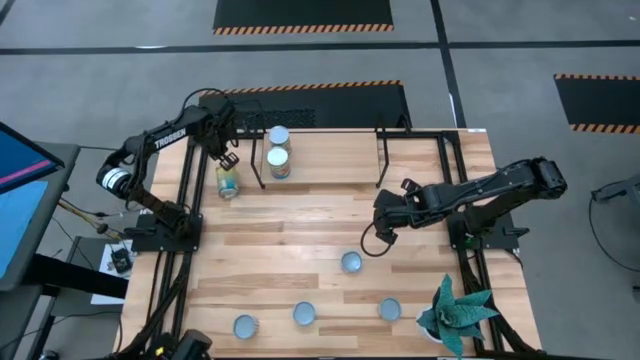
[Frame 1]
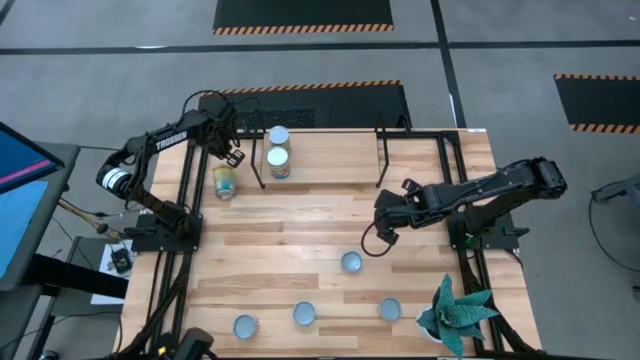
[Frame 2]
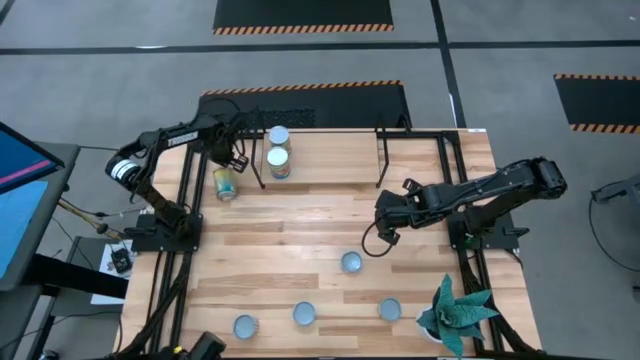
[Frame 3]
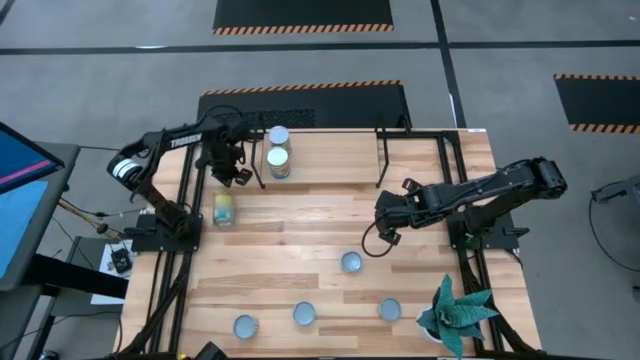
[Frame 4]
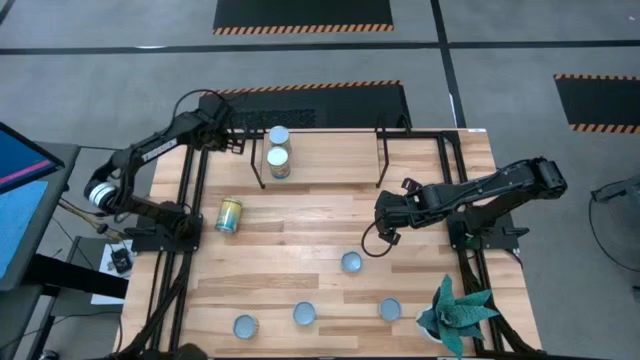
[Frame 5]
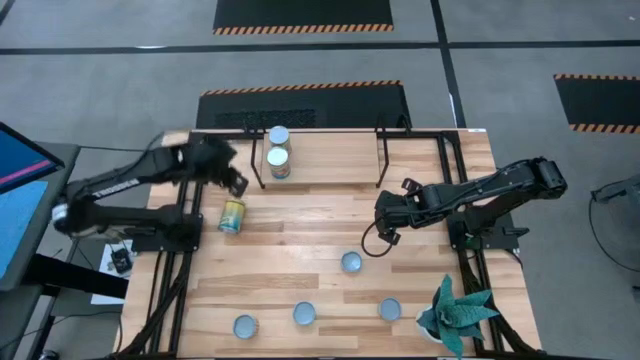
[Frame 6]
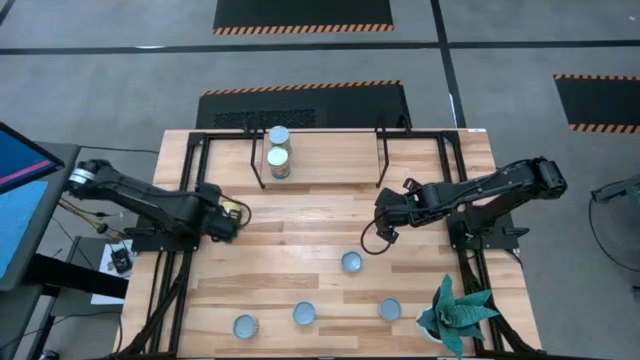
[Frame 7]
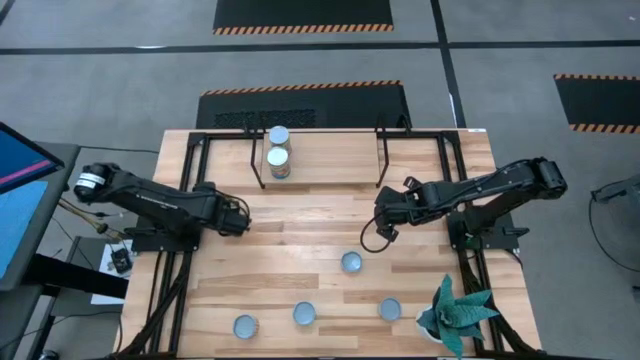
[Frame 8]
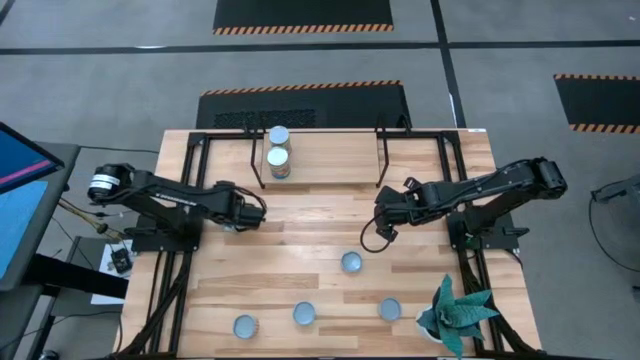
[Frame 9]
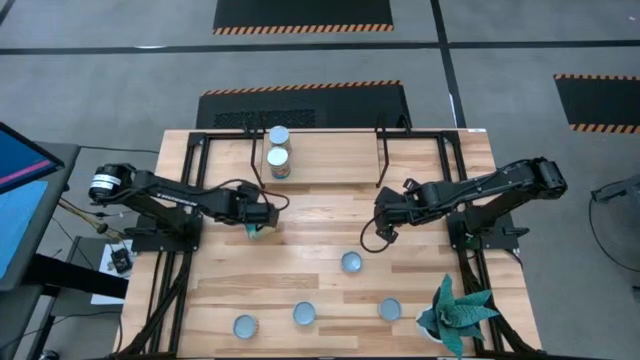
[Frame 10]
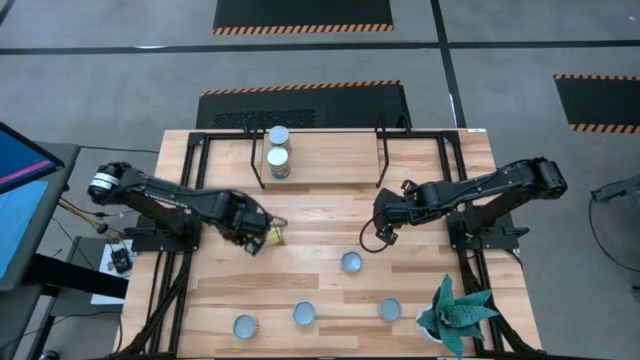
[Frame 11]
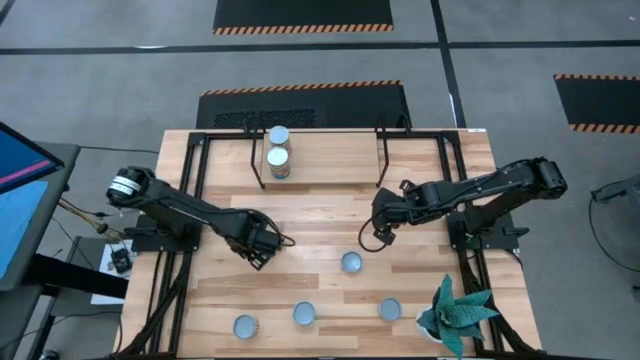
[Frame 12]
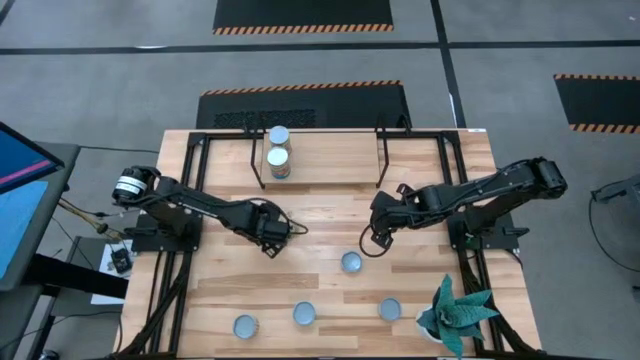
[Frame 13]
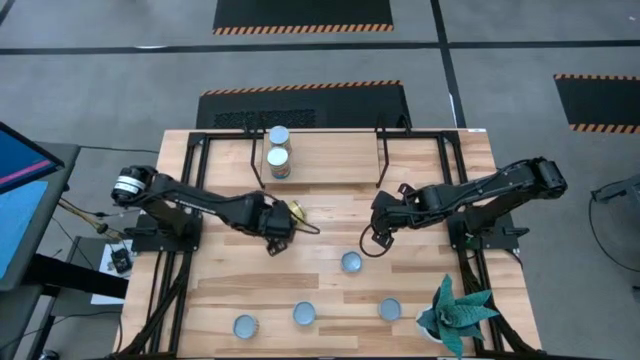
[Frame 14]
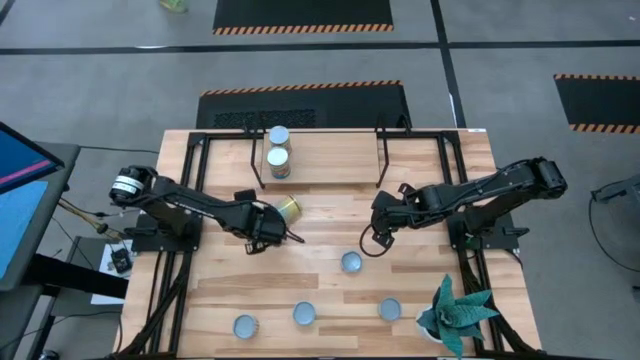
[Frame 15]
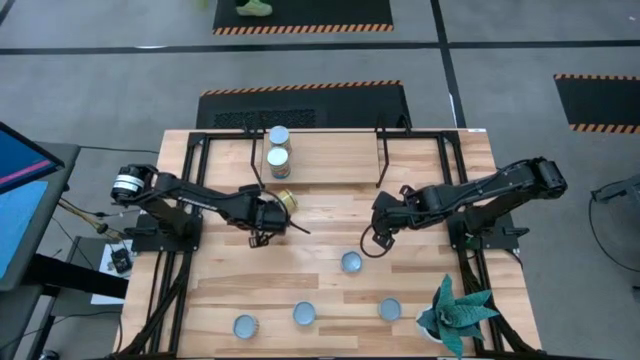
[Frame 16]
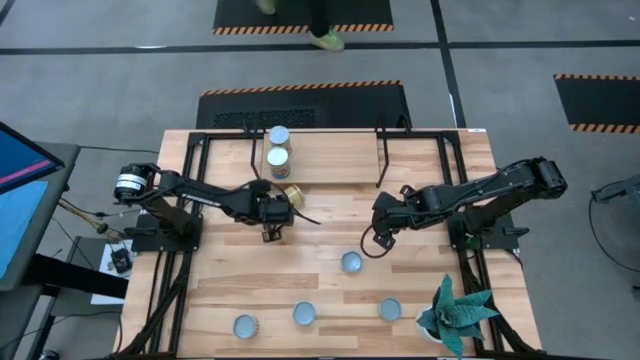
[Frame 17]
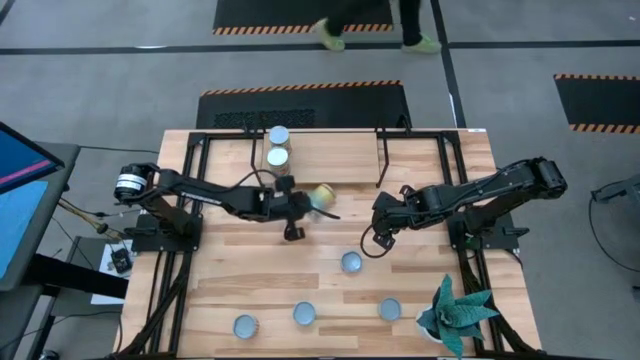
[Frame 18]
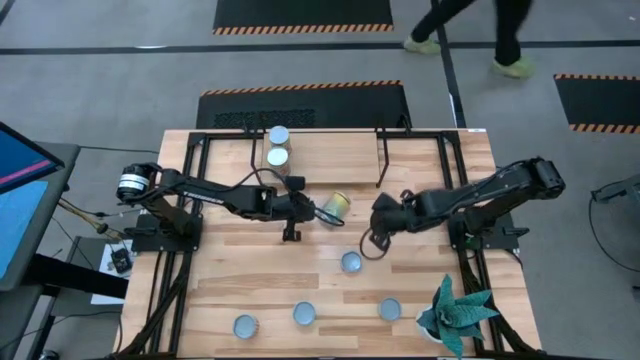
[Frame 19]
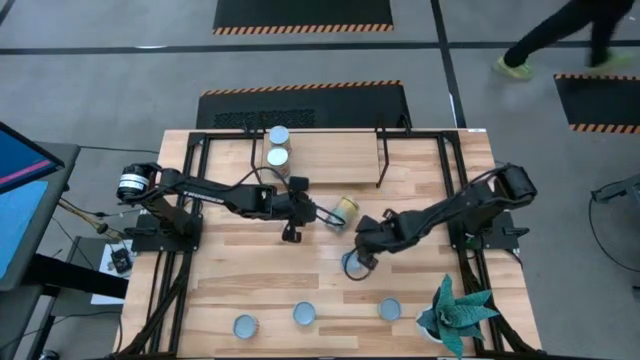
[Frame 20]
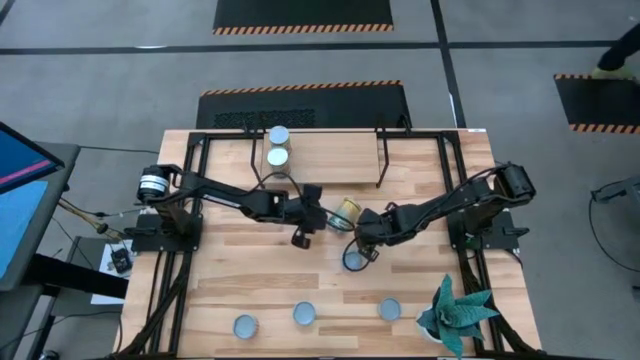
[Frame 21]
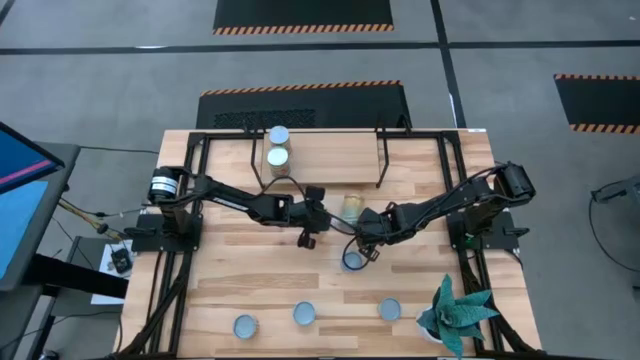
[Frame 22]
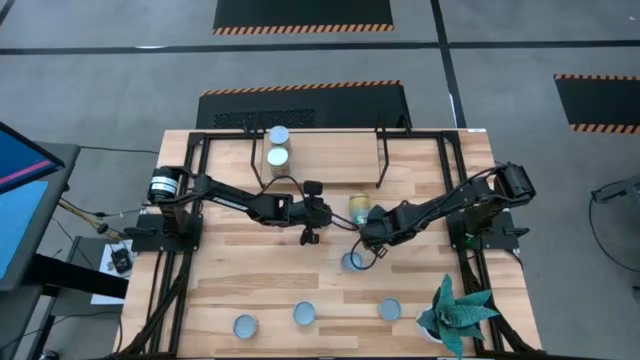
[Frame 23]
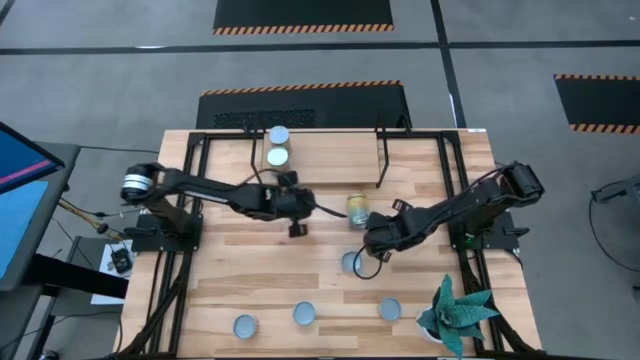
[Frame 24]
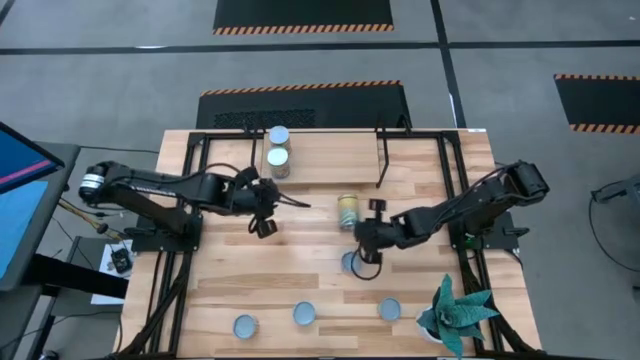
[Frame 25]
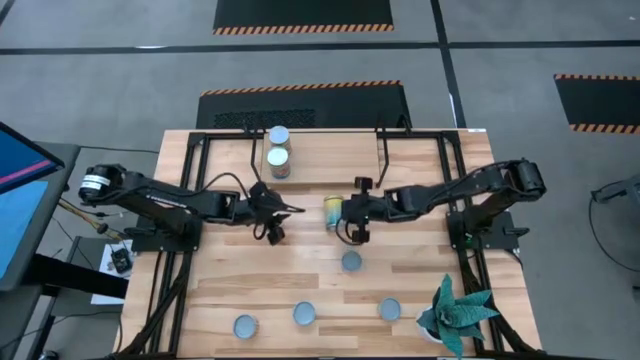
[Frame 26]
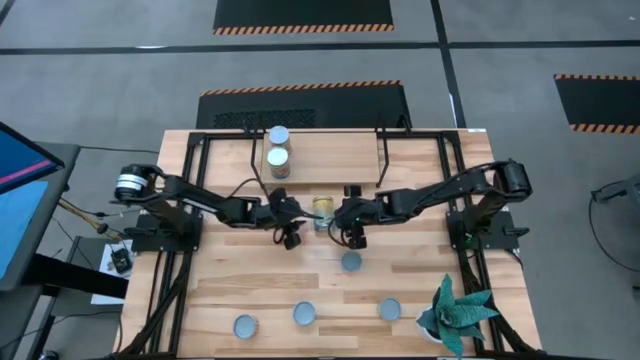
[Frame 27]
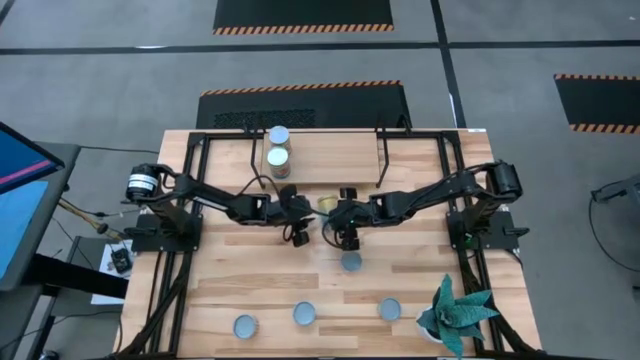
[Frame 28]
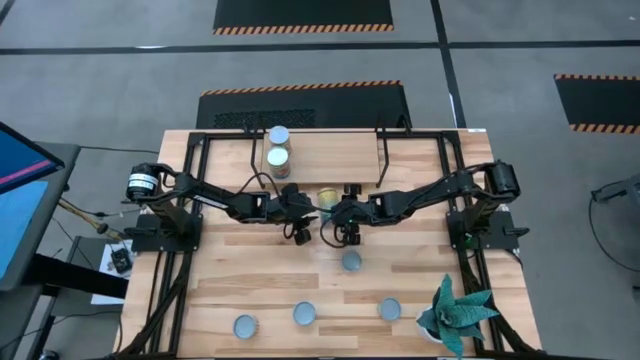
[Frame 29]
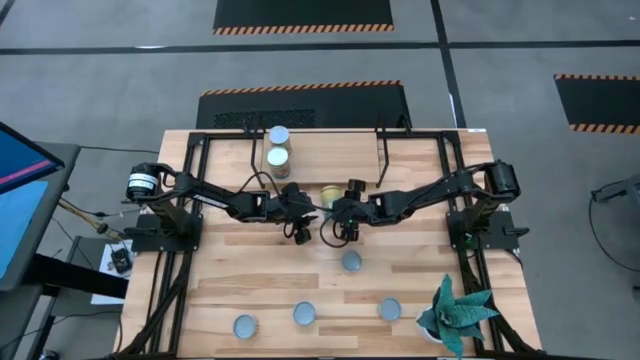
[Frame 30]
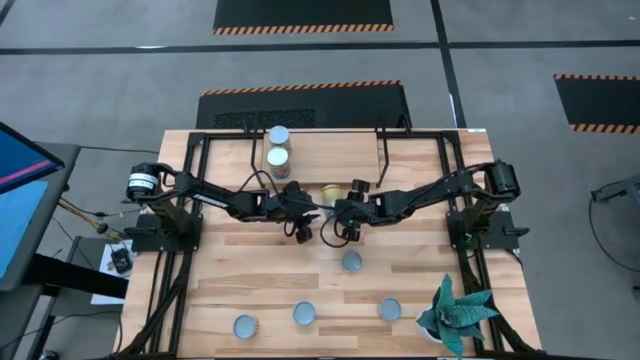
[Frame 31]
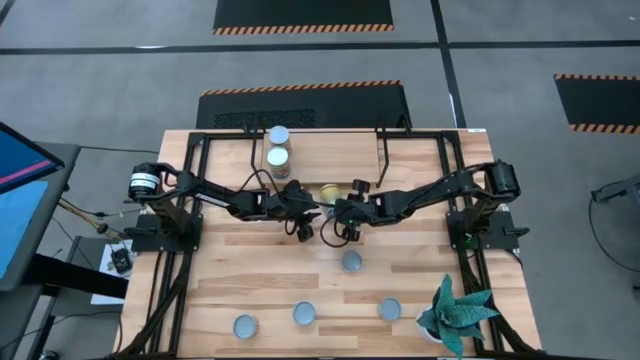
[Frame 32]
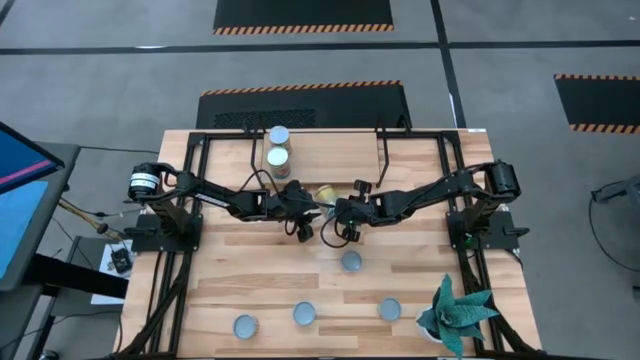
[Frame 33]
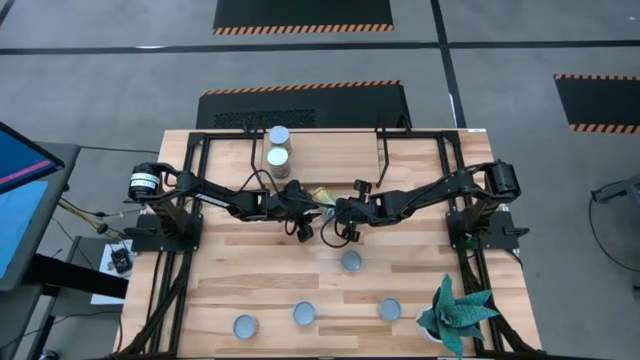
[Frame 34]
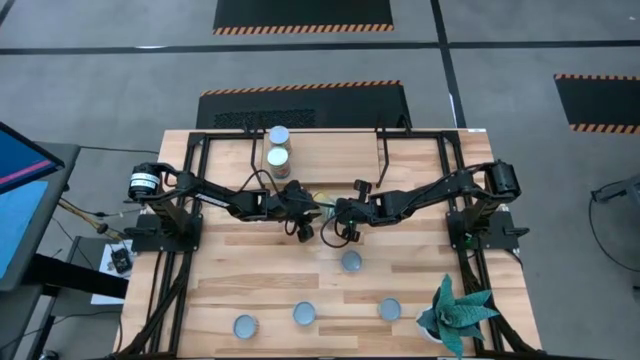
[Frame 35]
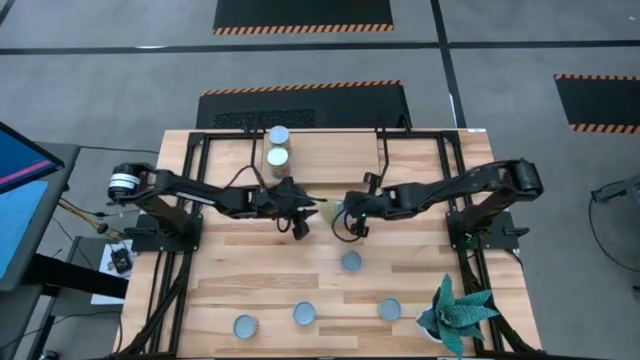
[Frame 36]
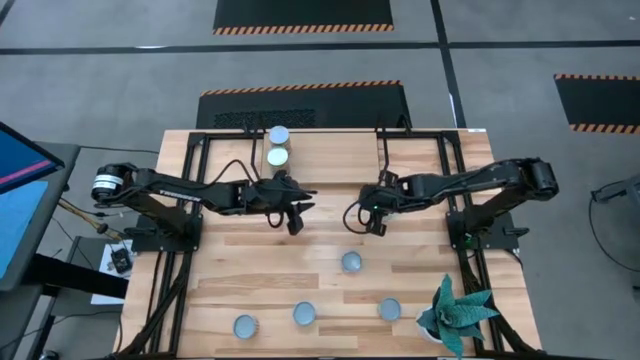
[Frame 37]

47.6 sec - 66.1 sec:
Task: Pick and place cans onto a shelf
Put the canned carrots on the shelf

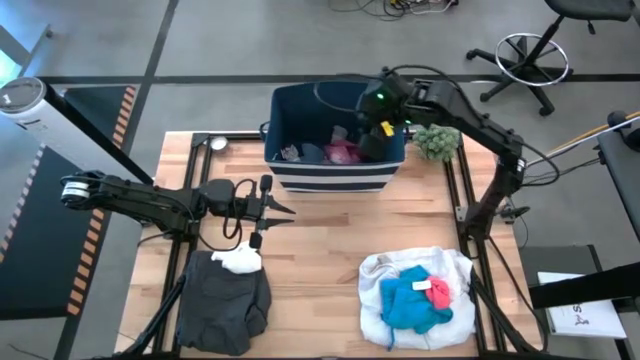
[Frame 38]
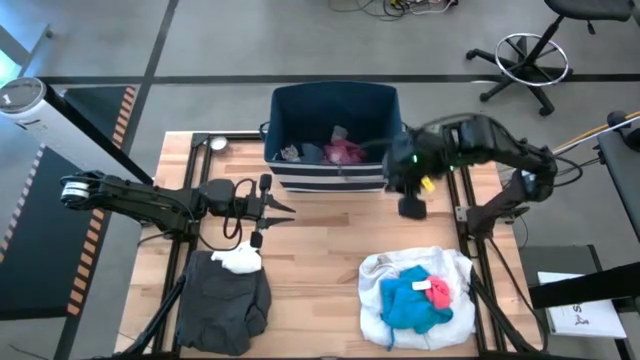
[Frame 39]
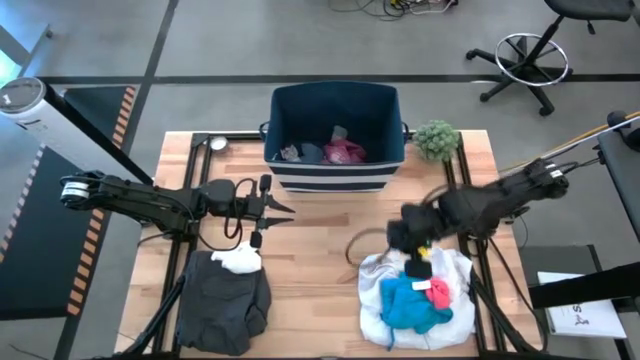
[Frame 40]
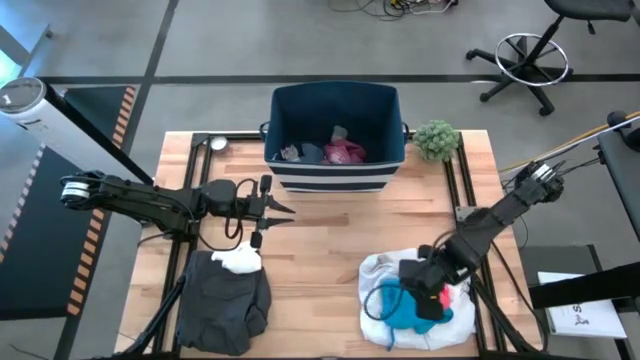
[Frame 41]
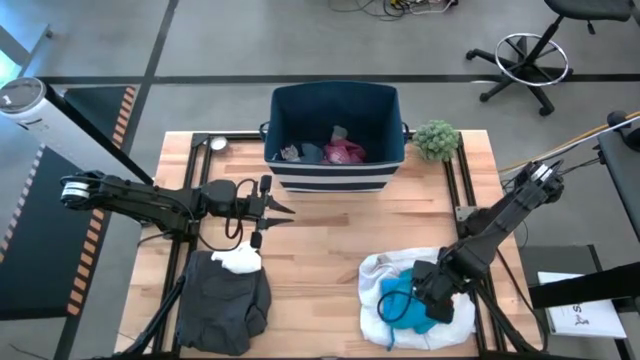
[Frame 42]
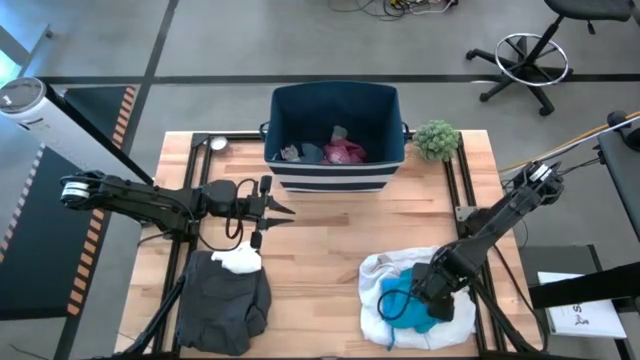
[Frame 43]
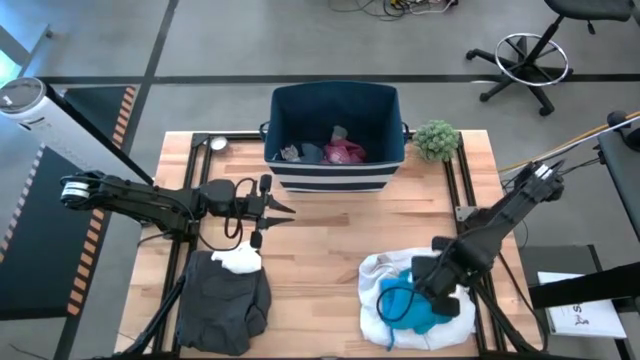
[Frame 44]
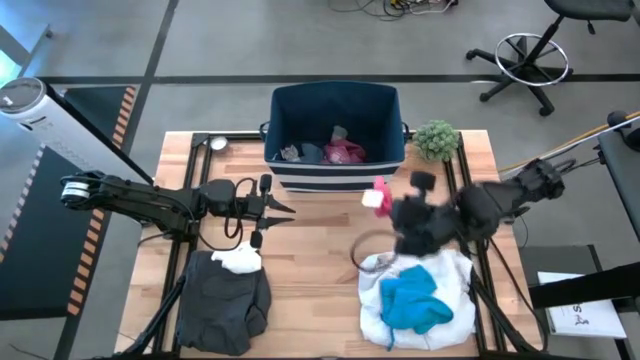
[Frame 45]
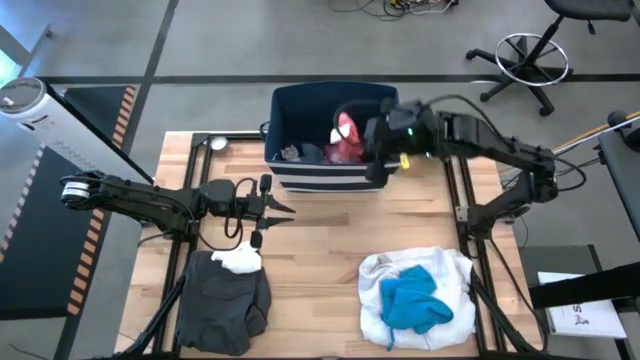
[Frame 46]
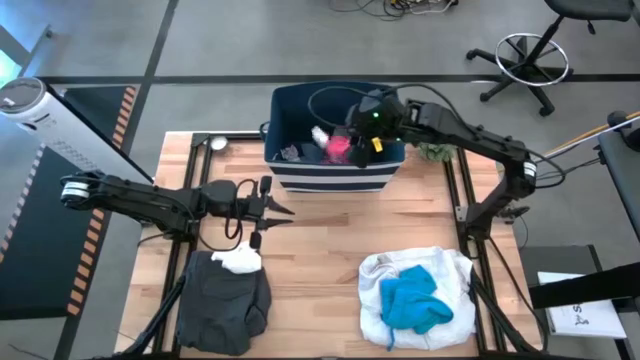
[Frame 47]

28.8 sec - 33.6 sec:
Task: Sort clothes
Put the orange socks into the laundry organizer
